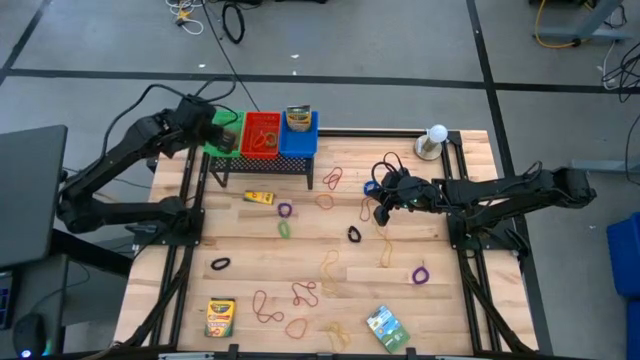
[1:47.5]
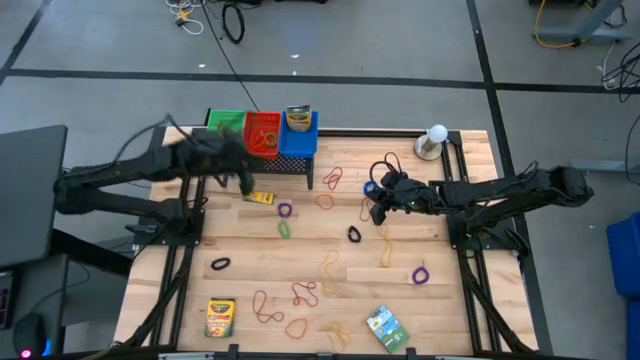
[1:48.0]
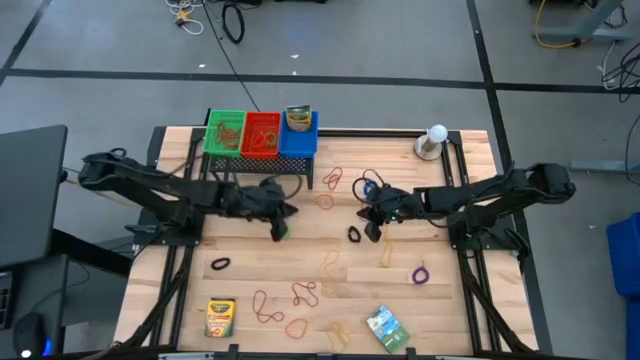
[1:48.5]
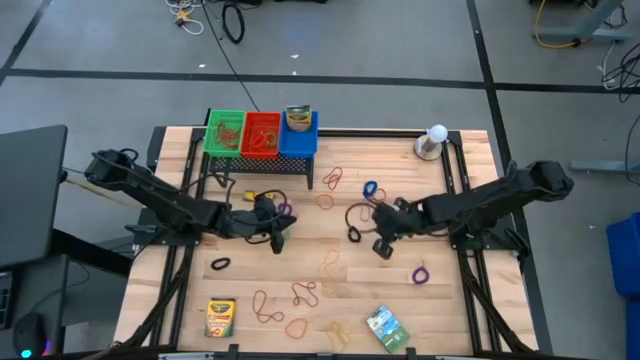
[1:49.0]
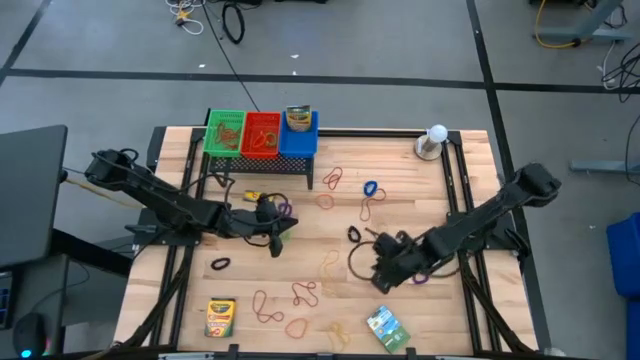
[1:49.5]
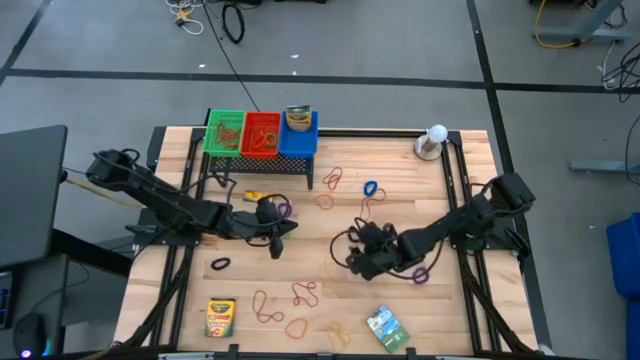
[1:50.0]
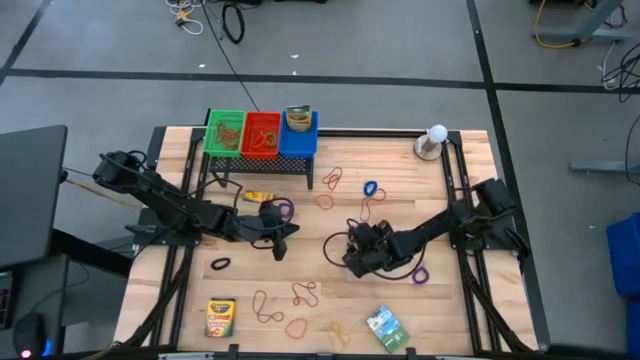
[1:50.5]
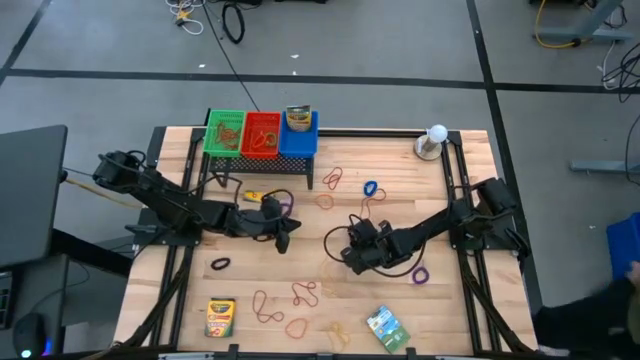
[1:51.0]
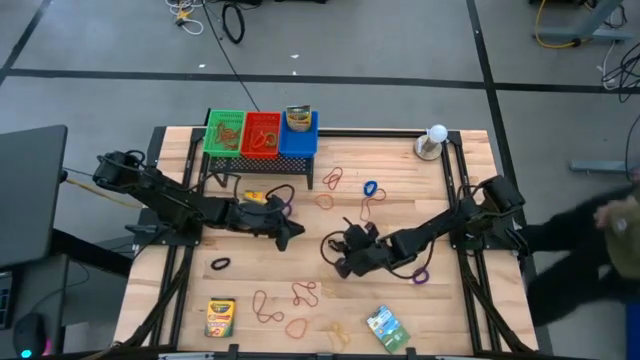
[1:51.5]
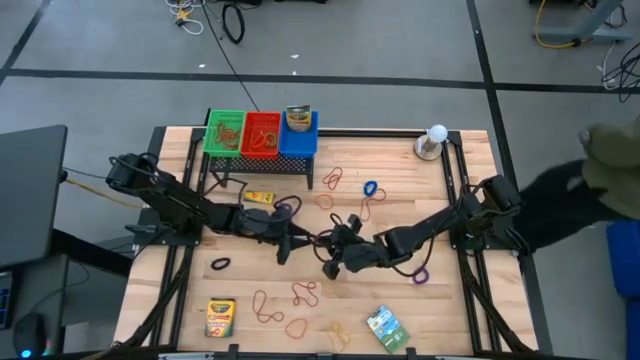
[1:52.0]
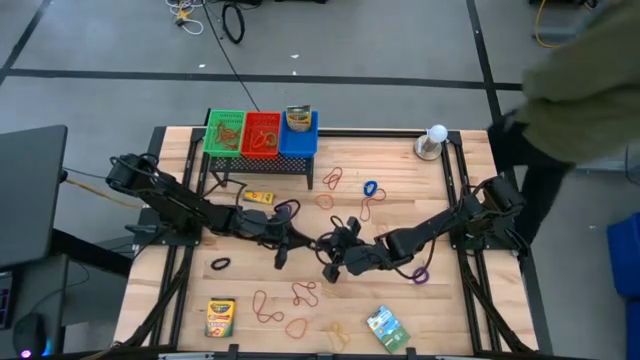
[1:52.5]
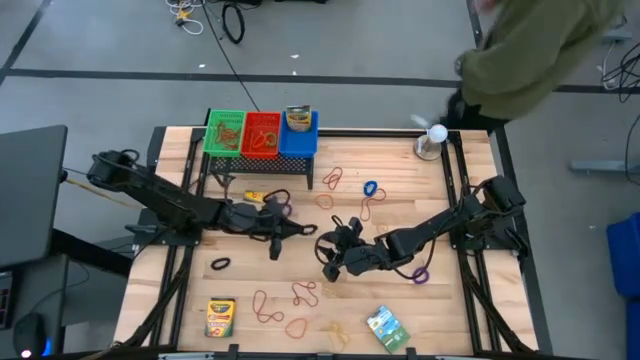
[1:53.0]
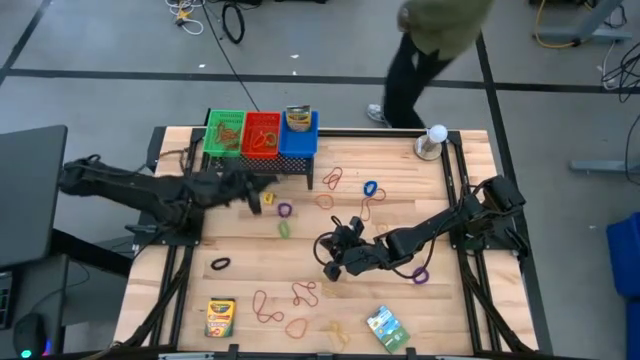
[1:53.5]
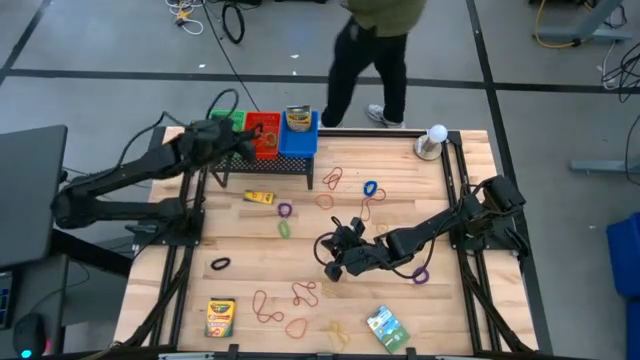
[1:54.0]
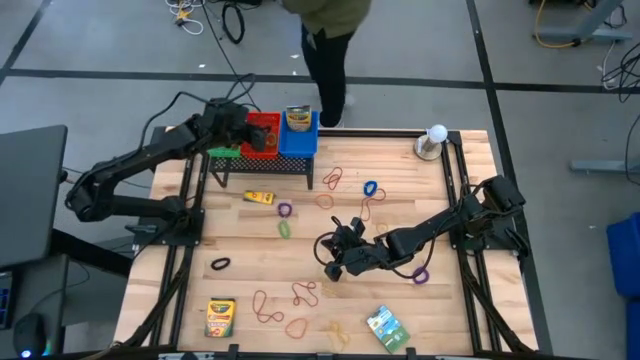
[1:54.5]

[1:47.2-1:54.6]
Task: Pick & Place Office Desk Supplies
Put the black spring rubber band into the red bin on the shelf

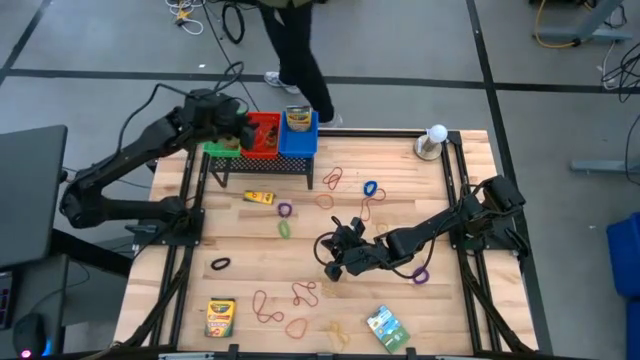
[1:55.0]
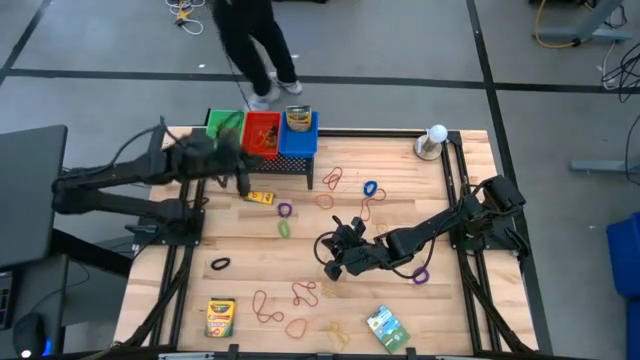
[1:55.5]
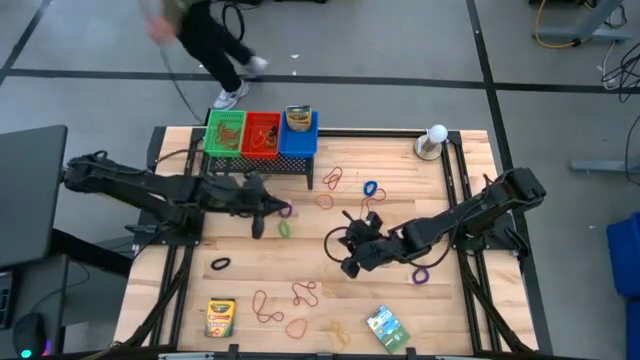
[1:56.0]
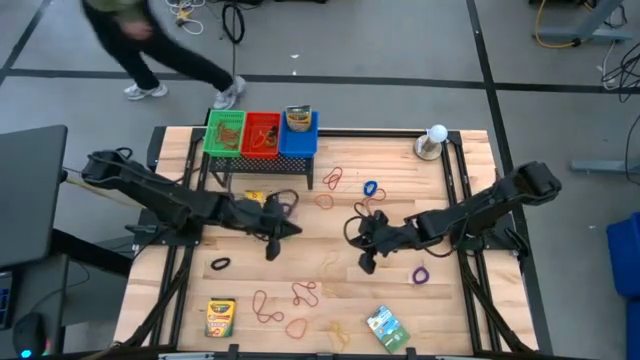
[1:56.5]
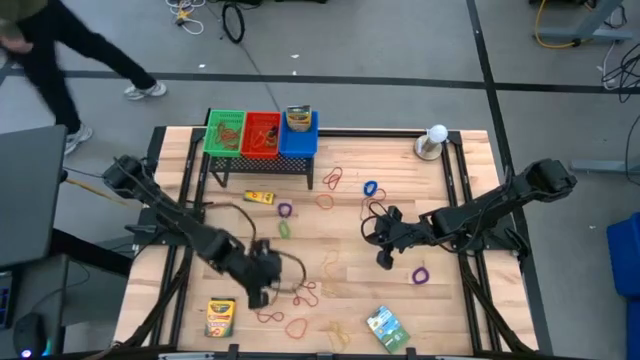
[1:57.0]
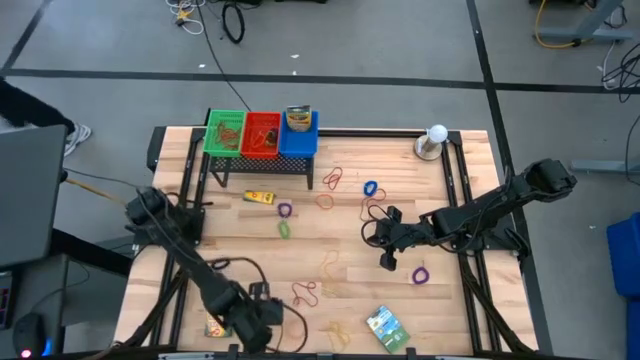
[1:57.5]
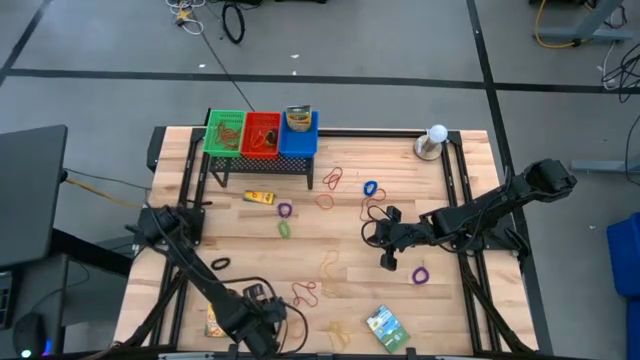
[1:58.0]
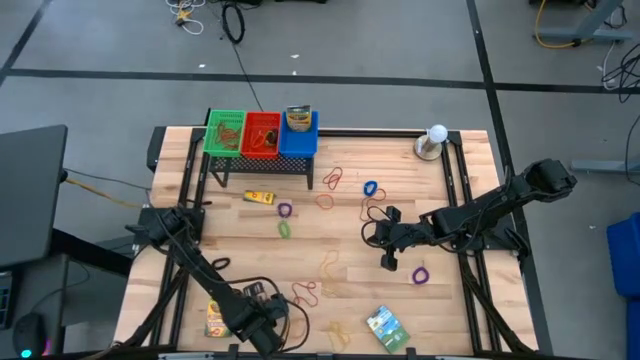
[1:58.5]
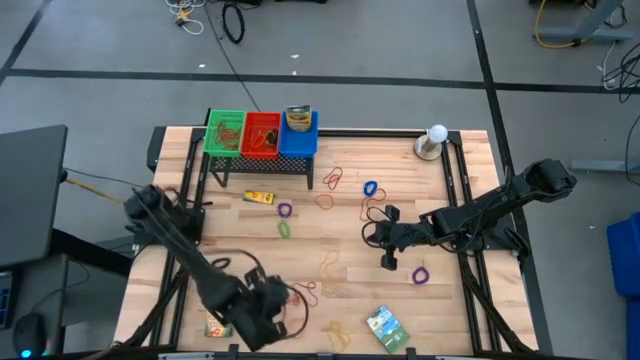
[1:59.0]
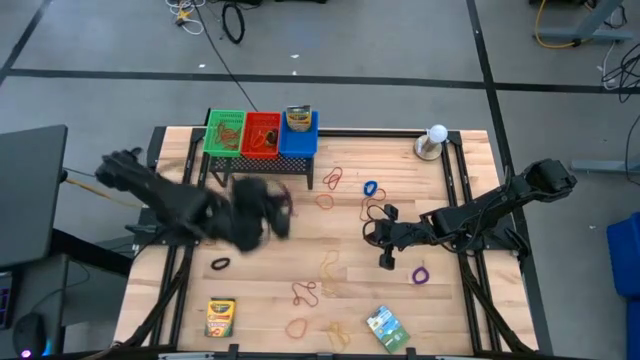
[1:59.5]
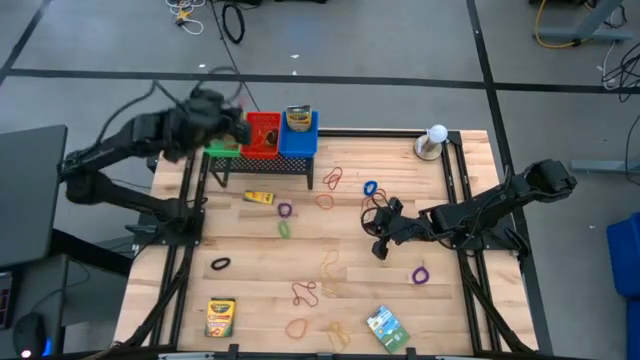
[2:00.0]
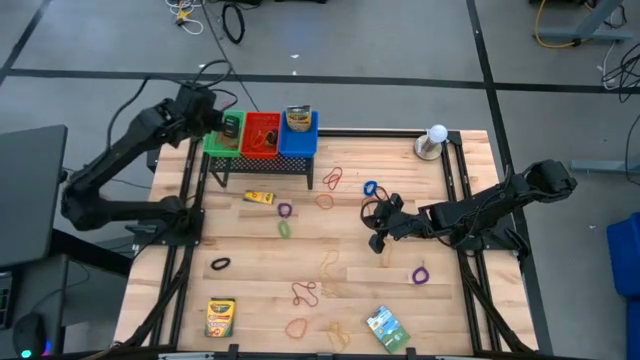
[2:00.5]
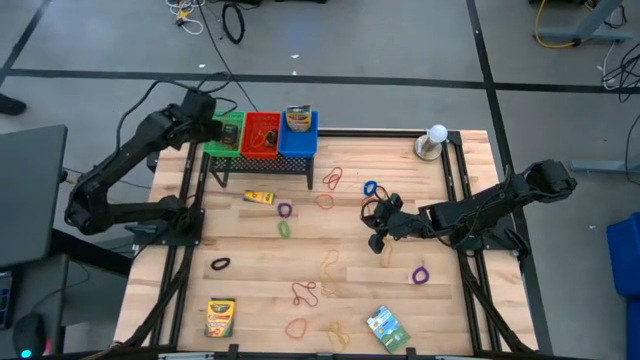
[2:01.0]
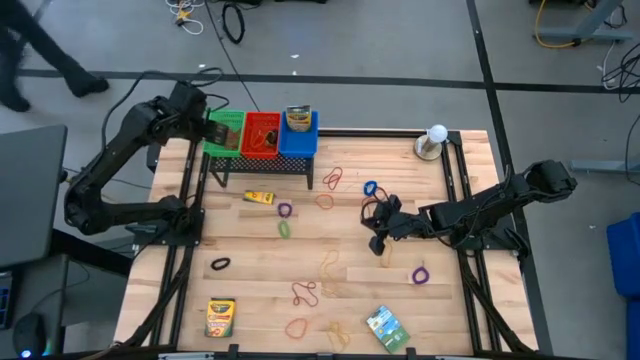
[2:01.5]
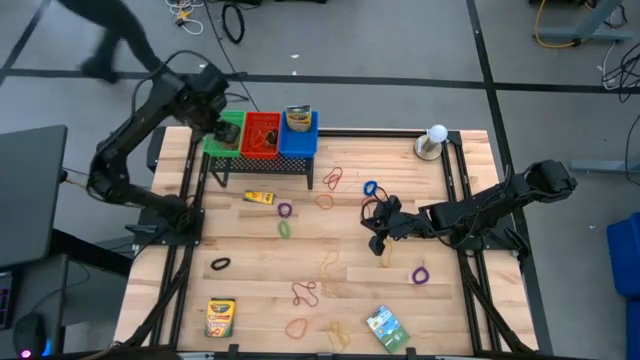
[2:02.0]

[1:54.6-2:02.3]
Put the red rubber band into the green bin on the shelf

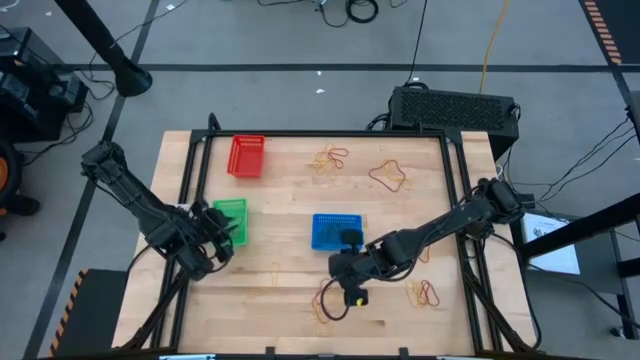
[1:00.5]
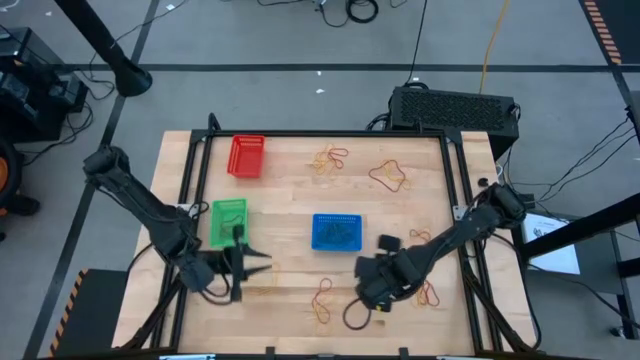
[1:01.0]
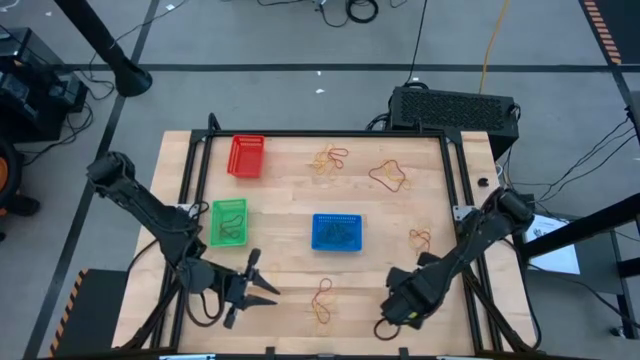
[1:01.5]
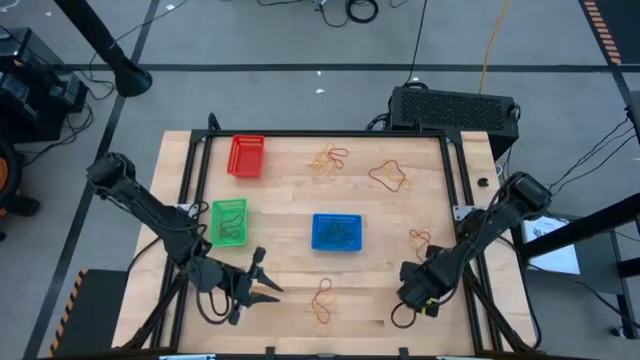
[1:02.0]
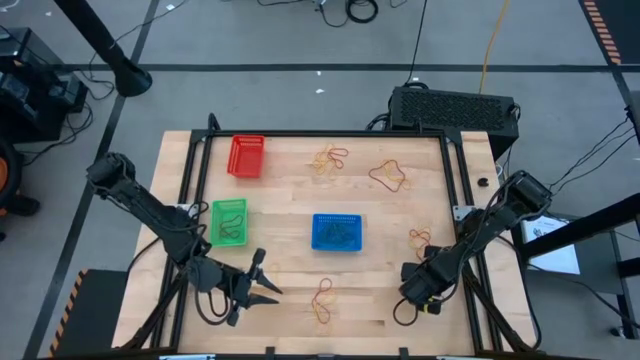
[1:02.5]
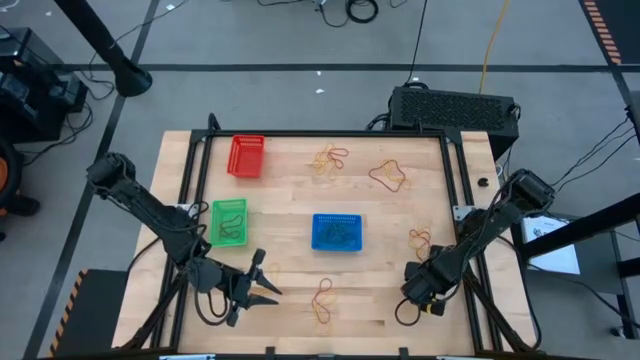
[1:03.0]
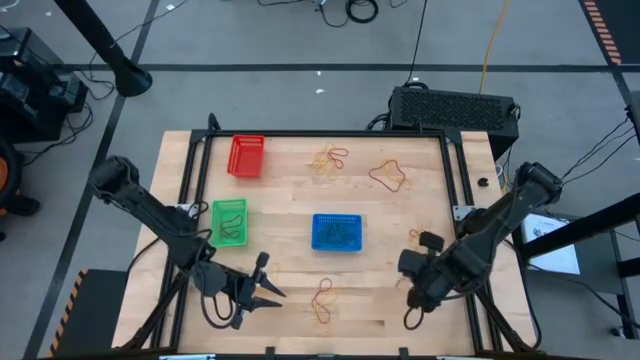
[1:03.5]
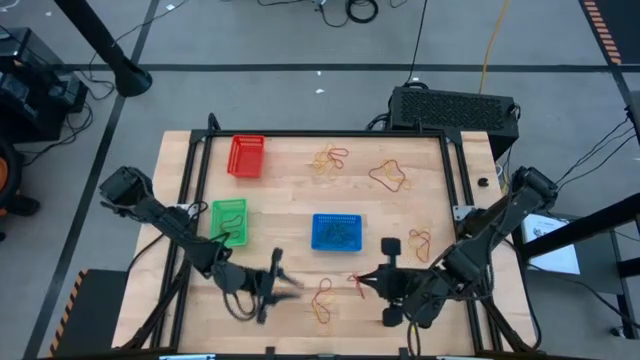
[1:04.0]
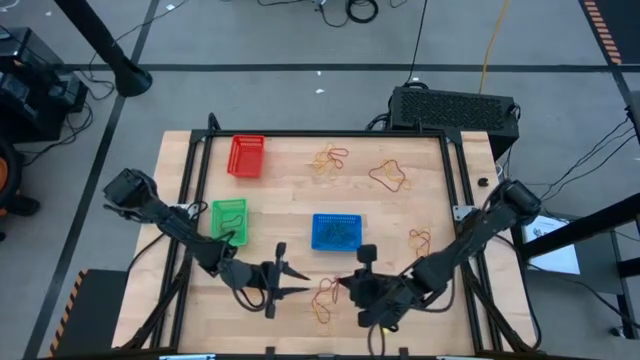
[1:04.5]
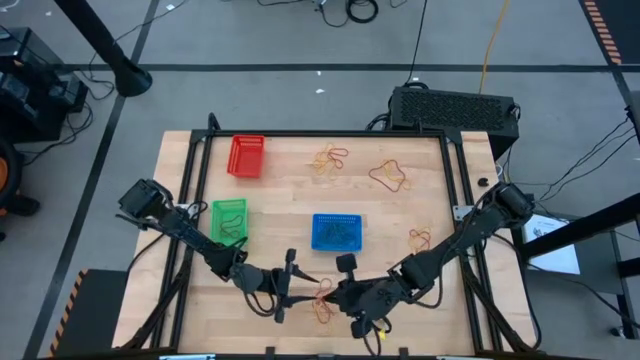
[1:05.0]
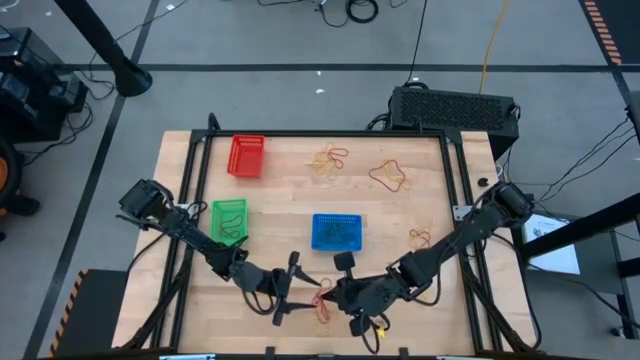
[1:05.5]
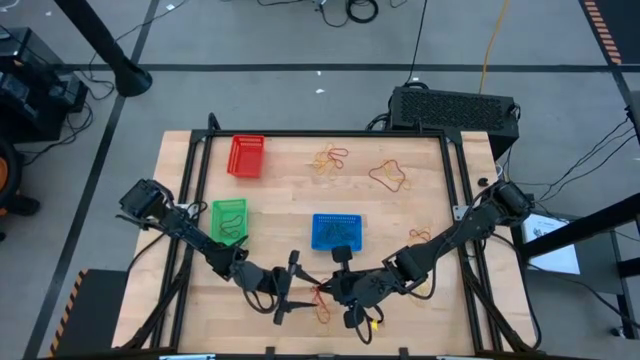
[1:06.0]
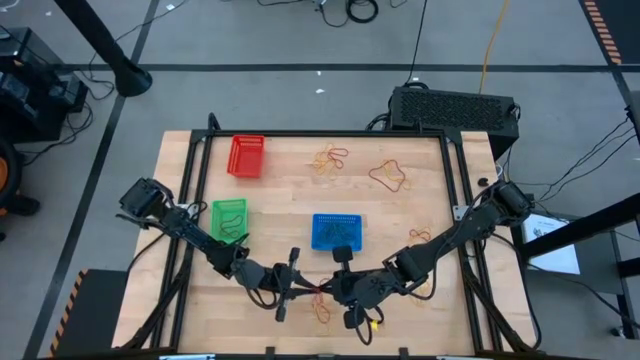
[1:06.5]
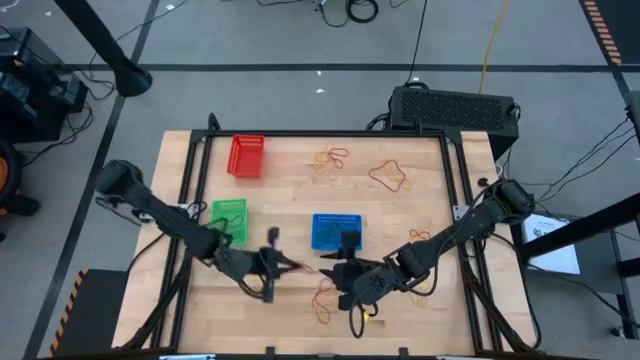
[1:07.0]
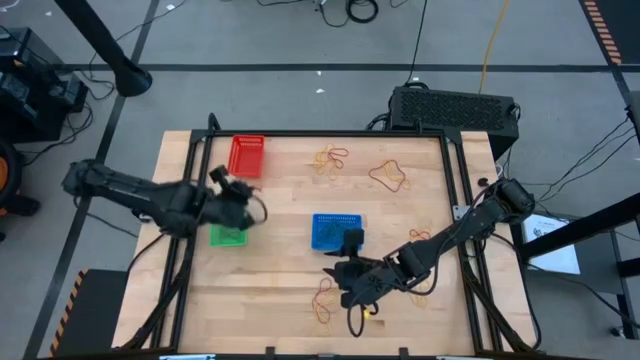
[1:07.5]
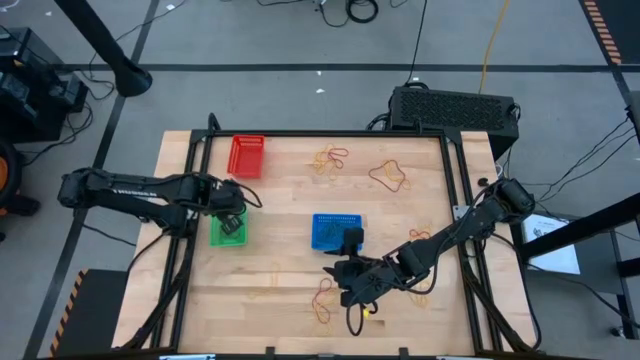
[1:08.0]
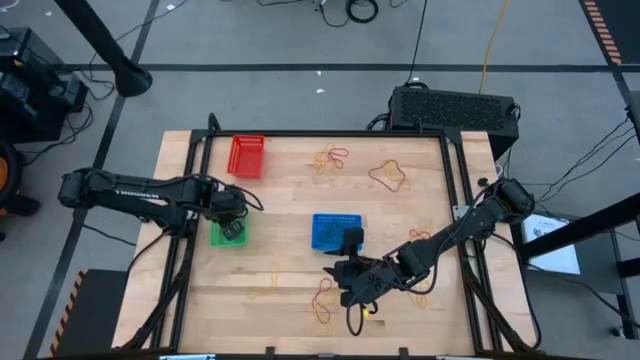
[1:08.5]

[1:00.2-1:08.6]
Task: Sort rubber bands into baskets
Put the red rubber band into the green bin
